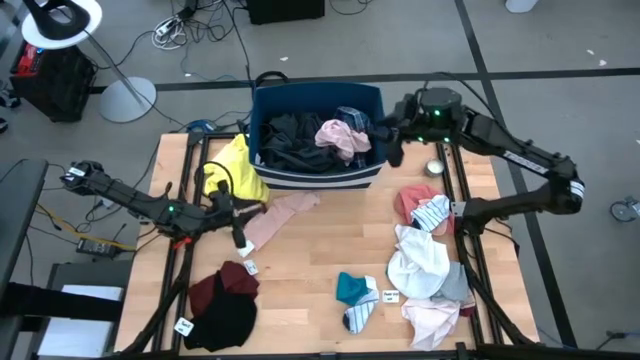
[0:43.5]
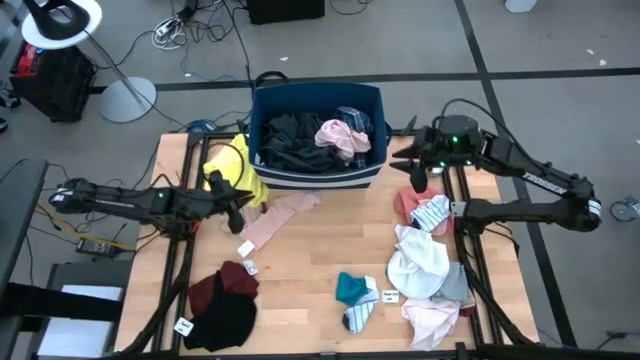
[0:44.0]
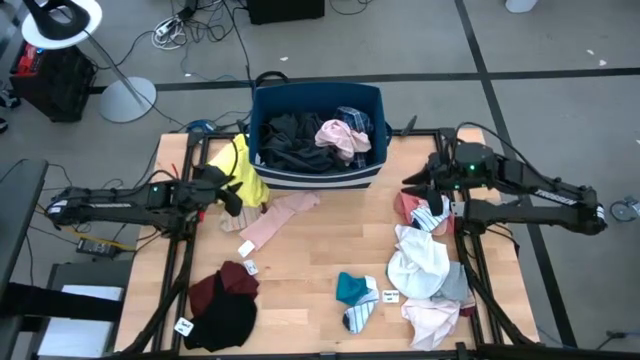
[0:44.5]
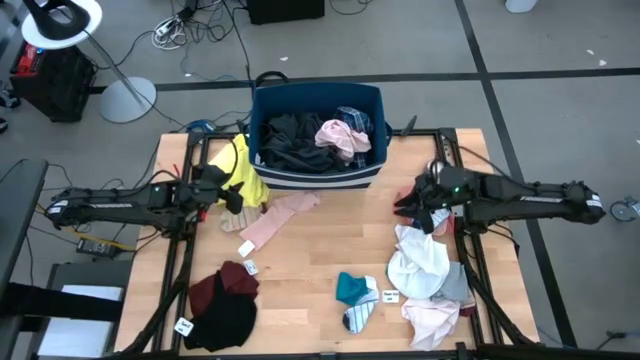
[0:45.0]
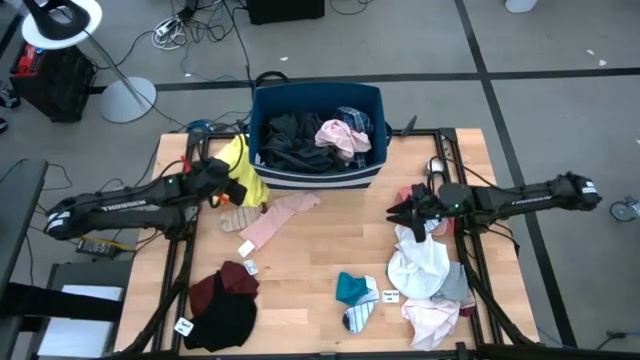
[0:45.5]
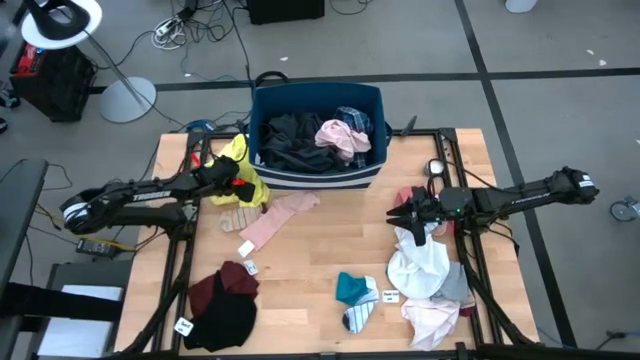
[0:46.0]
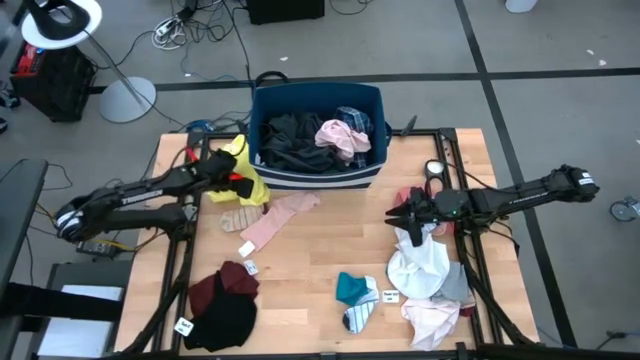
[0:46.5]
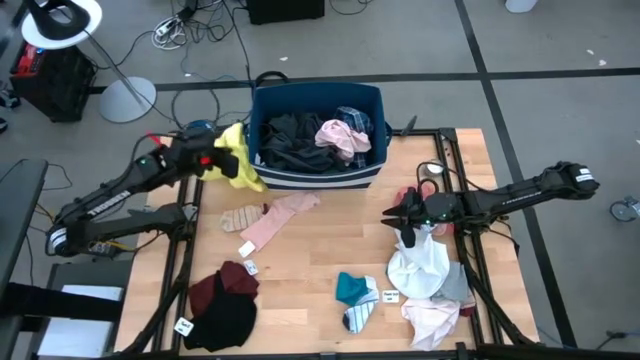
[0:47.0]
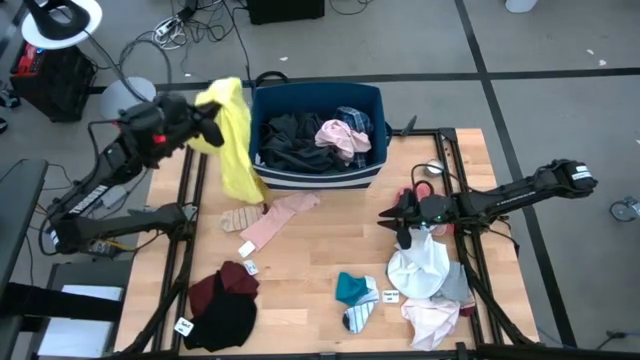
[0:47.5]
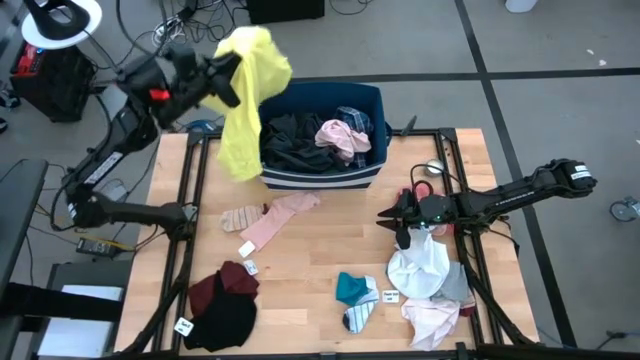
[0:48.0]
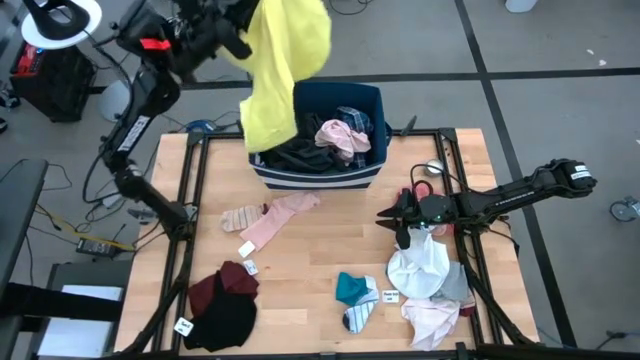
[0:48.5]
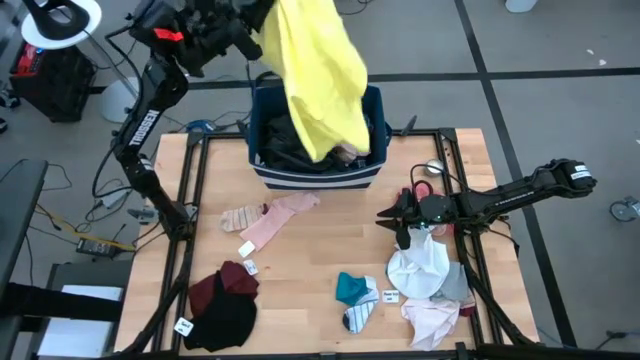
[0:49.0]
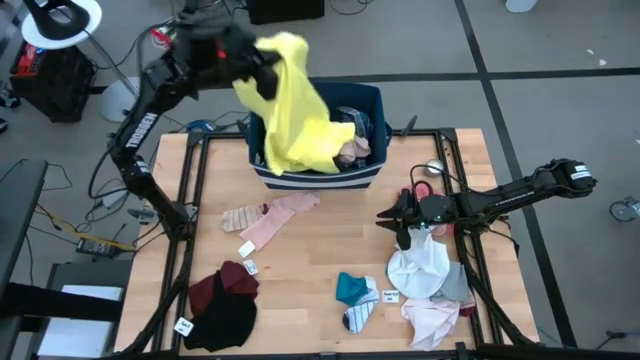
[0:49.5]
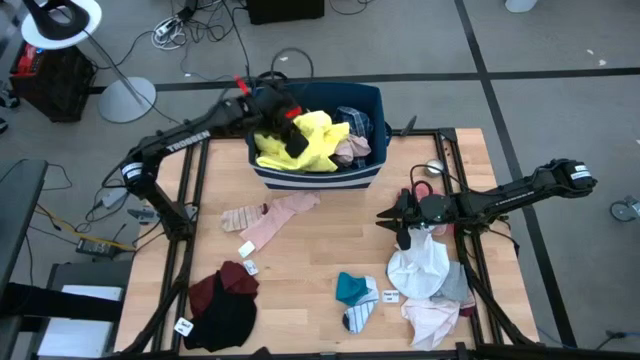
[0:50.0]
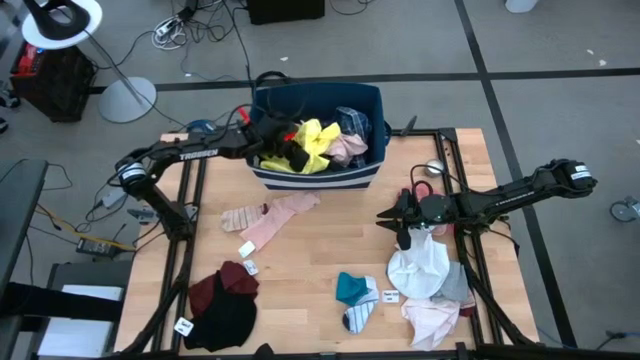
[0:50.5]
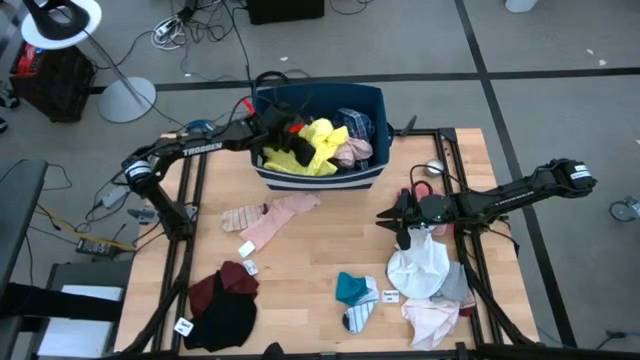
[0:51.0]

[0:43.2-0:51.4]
Task: Sort clothes
Put the yellow polo shirt into the blue laundry bin

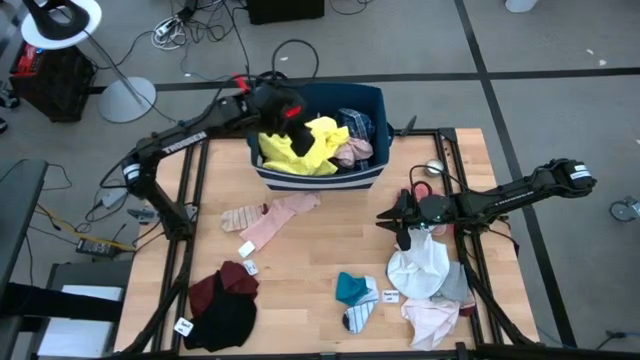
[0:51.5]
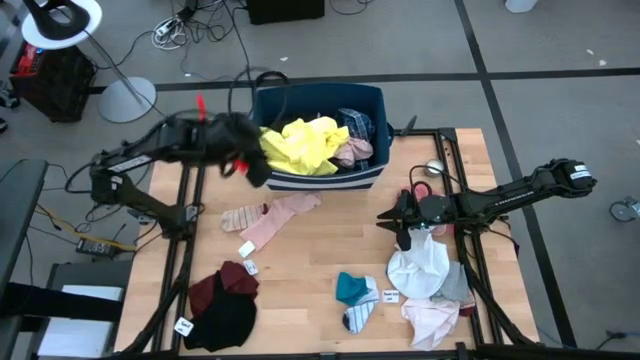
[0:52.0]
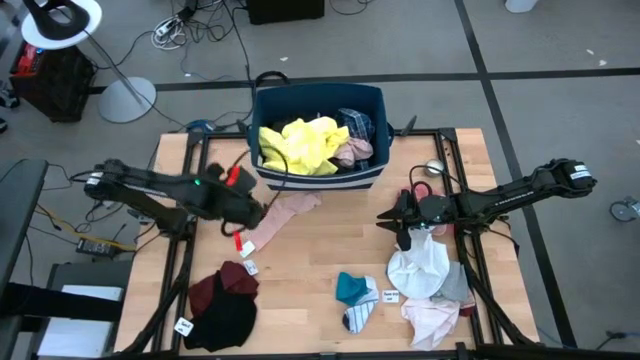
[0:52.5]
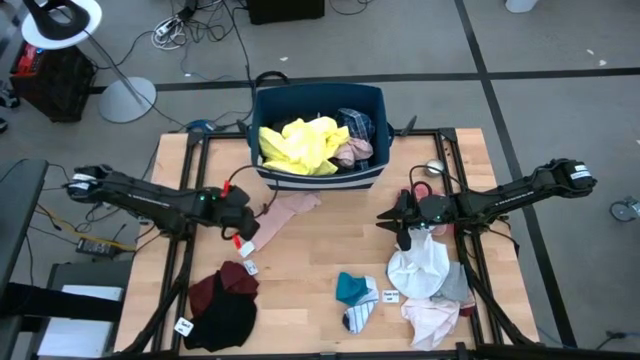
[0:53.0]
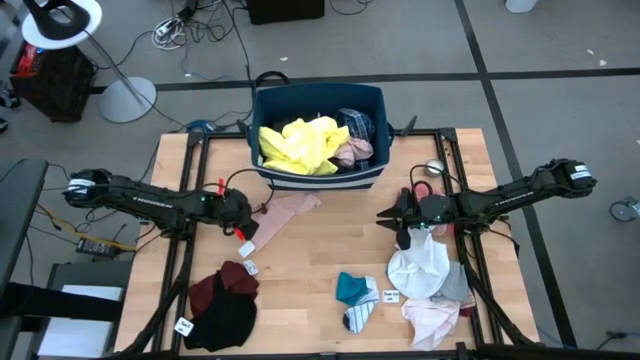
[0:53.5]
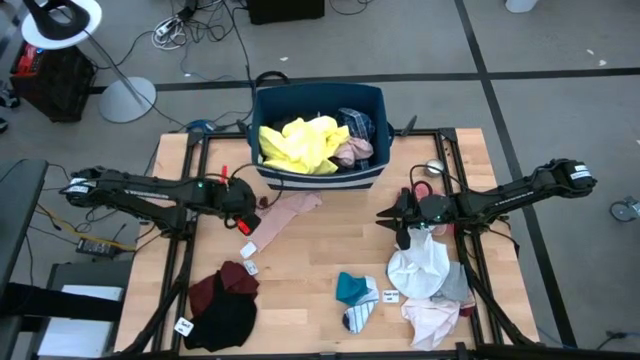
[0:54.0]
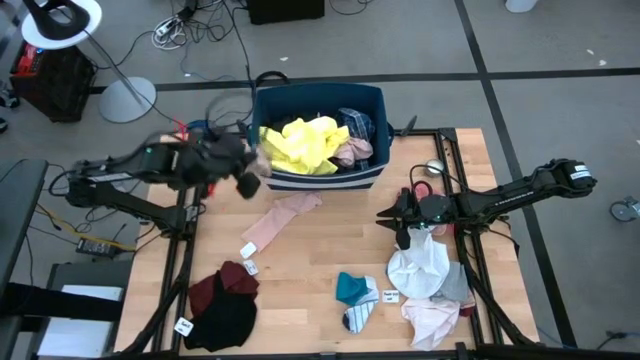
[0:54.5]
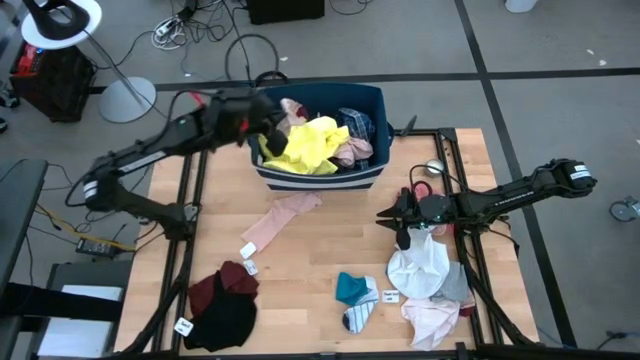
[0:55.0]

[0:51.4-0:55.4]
Put the light brown patterned sock into the blue laundry bin

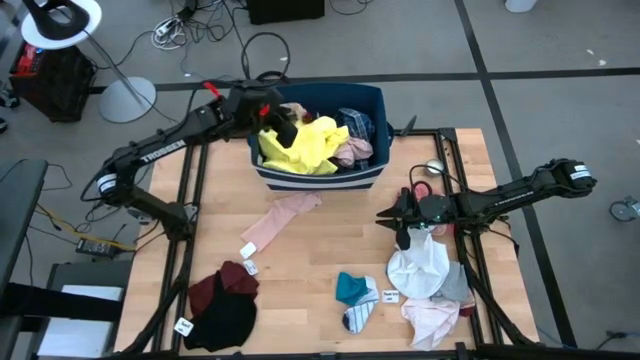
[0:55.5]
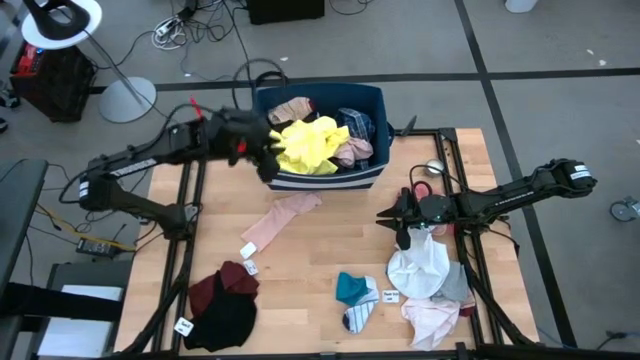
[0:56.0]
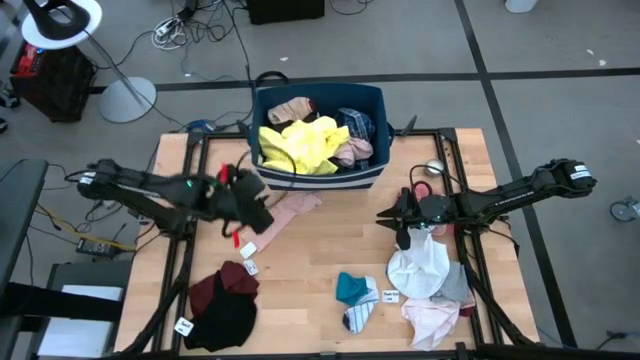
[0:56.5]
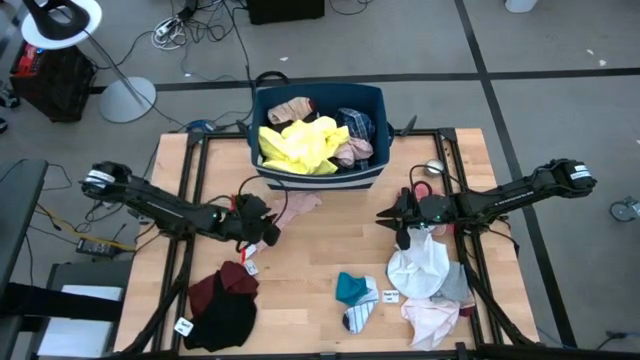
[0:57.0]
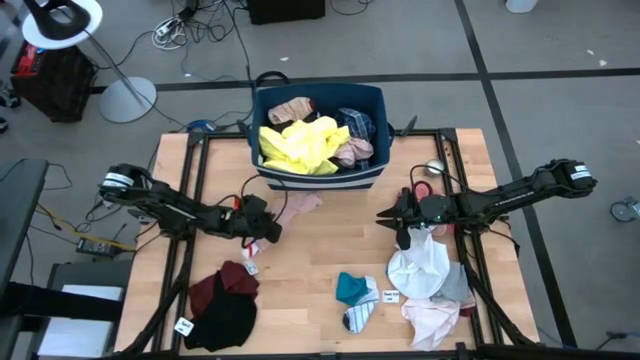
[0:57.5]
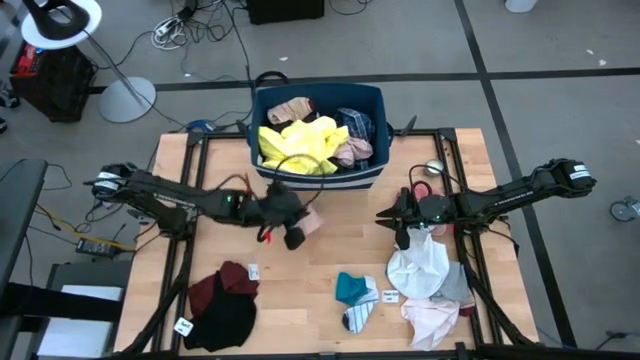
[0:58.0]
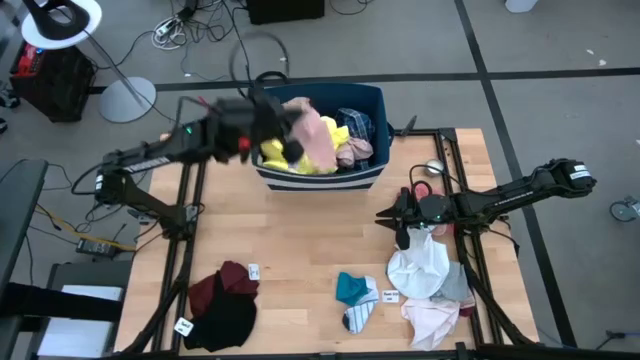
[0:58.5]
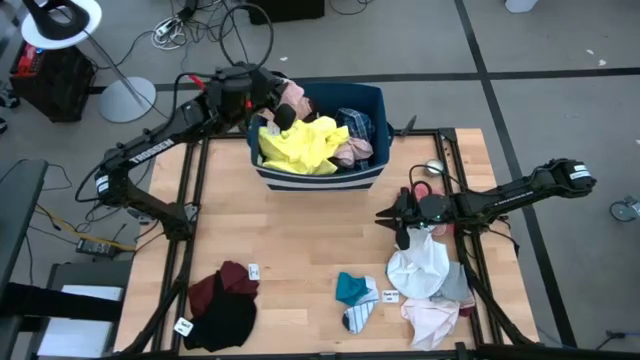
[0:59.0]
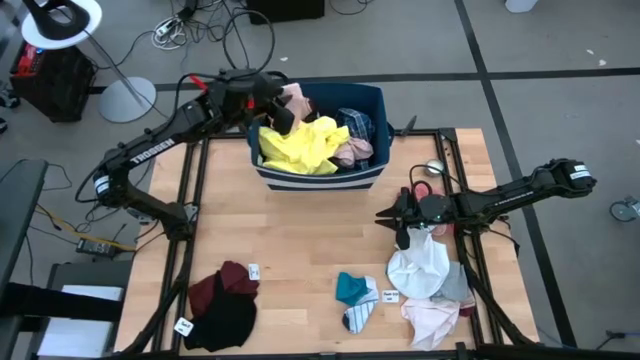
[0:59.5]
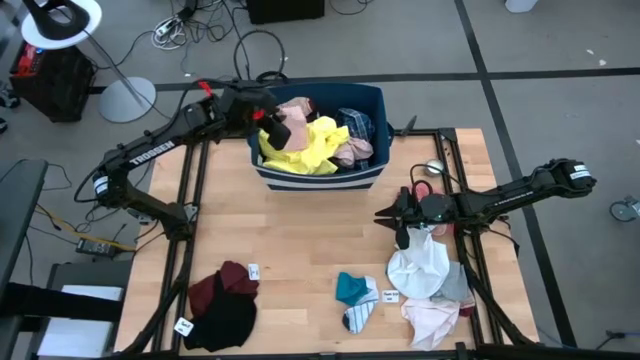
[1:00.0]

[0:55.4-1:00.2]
Put the light pink sock into the blue laundry bin

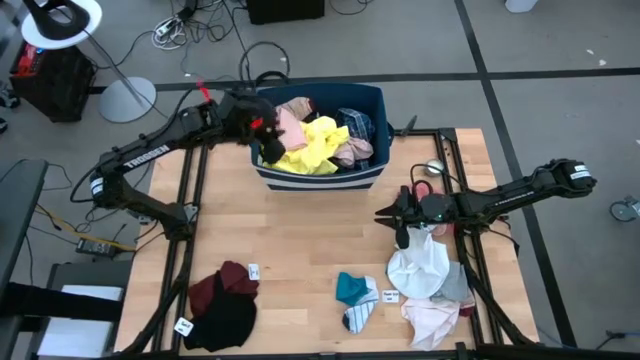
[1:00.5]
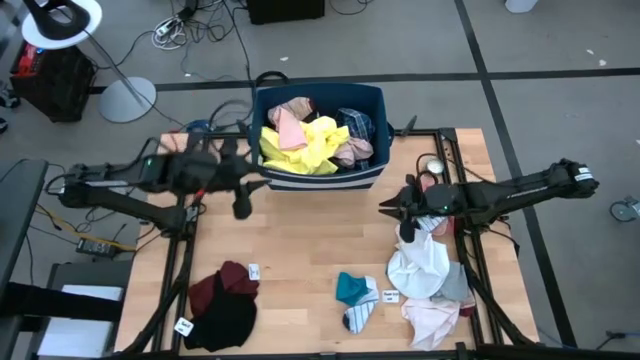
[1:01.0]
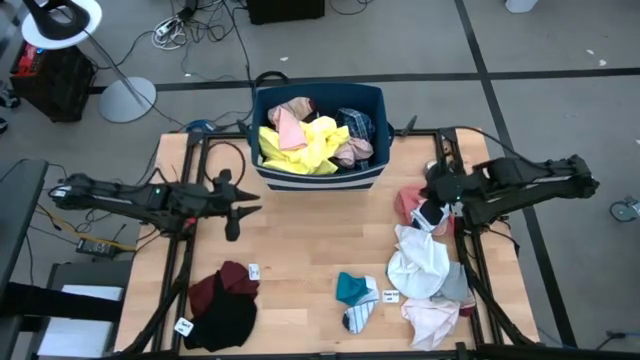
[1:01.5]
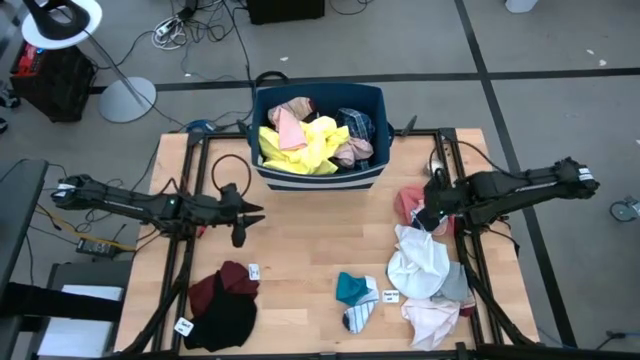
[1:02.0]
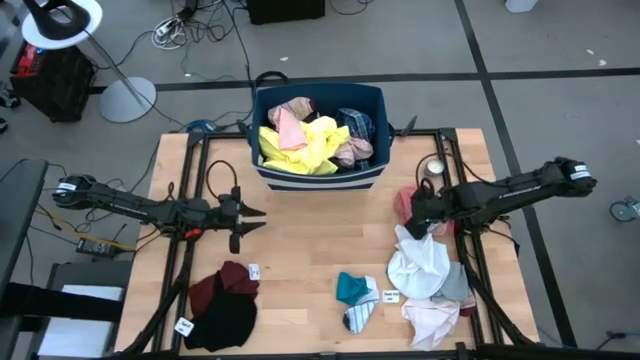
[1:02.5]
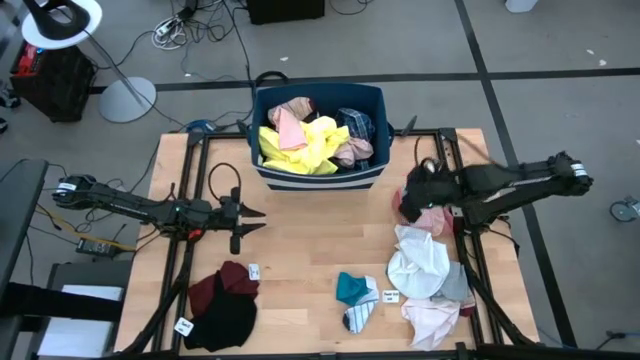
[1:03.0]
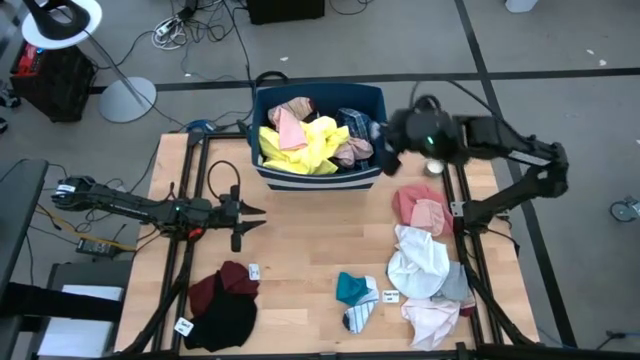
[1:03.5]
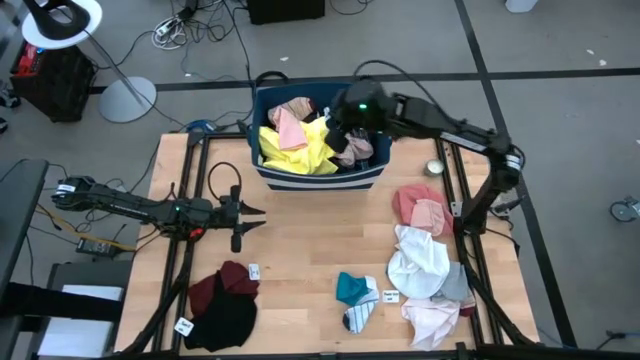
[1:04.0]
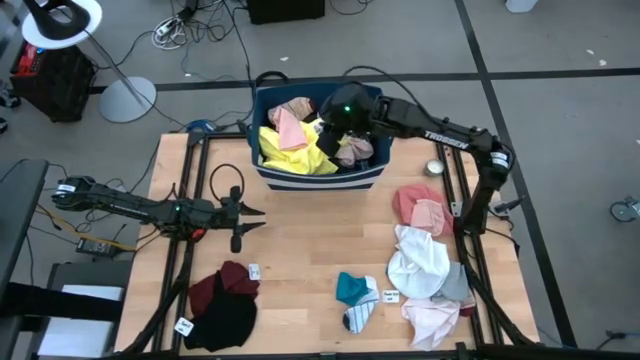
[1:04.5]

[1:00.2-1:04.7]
Put the white patterned sock into the blue laundry bin
